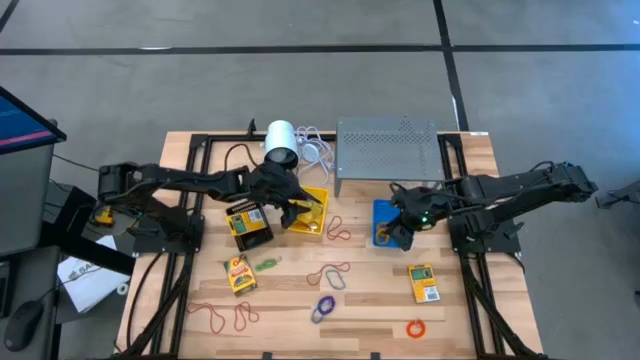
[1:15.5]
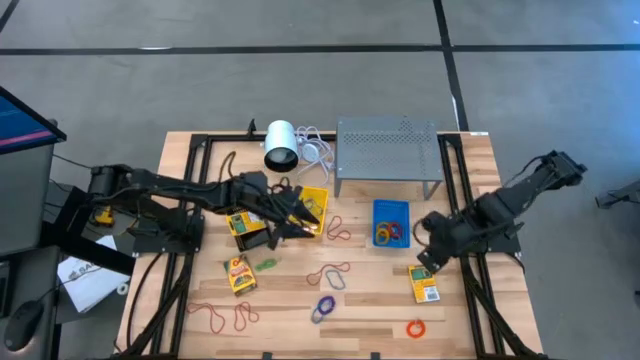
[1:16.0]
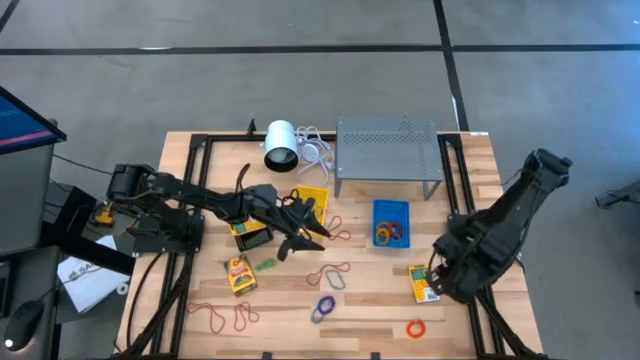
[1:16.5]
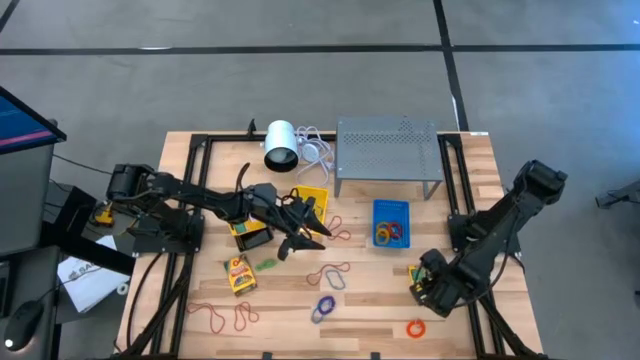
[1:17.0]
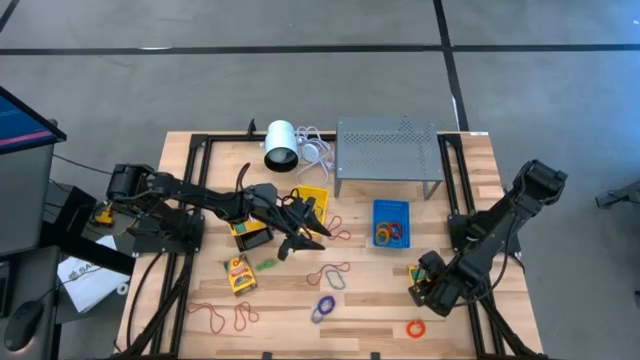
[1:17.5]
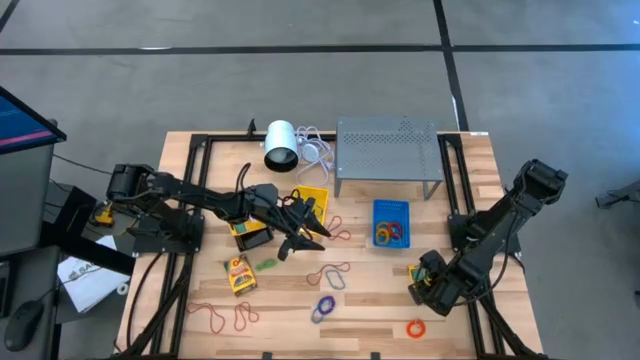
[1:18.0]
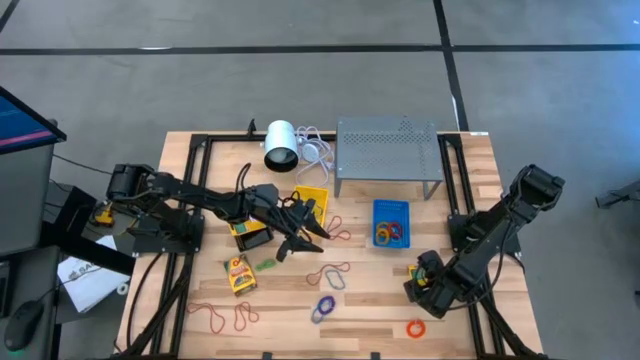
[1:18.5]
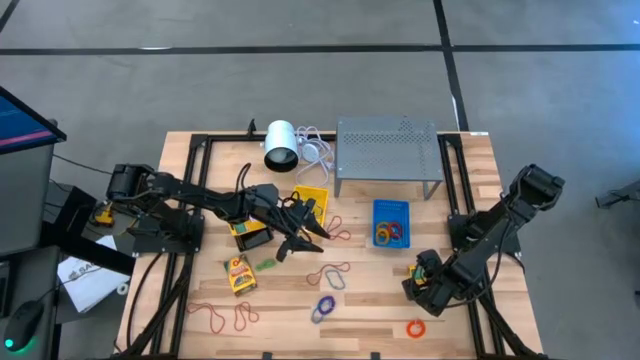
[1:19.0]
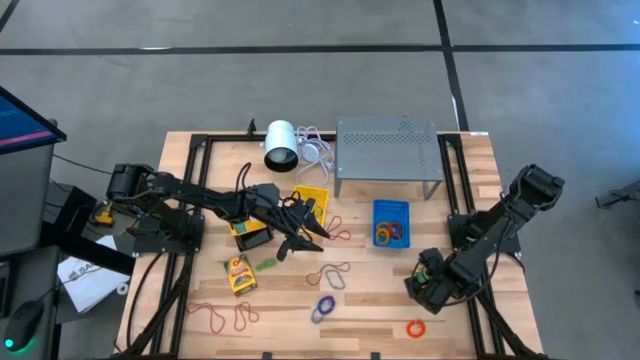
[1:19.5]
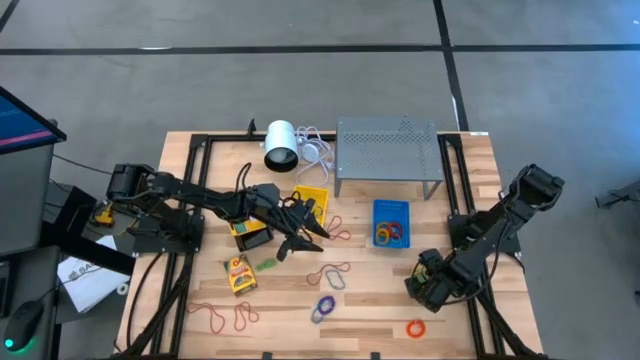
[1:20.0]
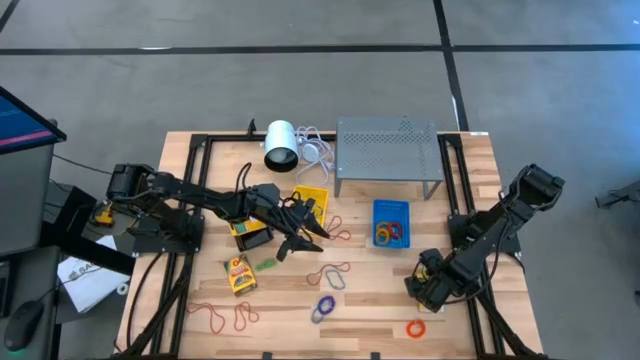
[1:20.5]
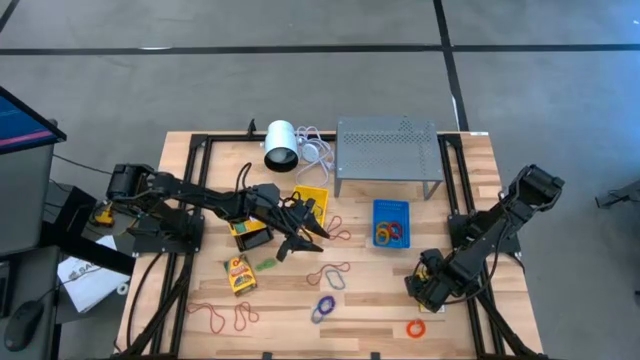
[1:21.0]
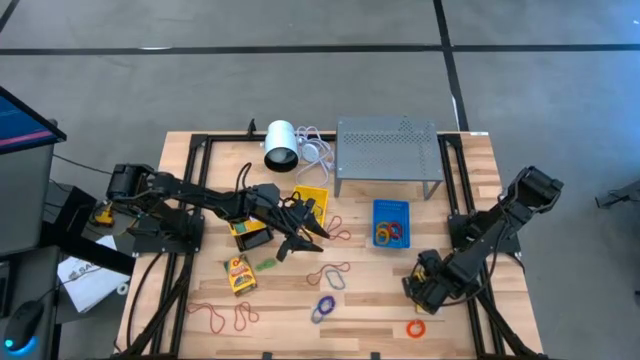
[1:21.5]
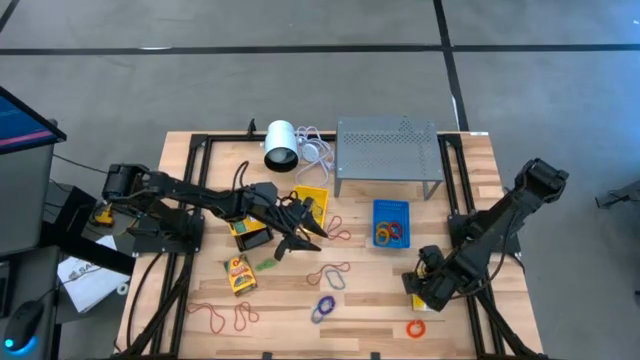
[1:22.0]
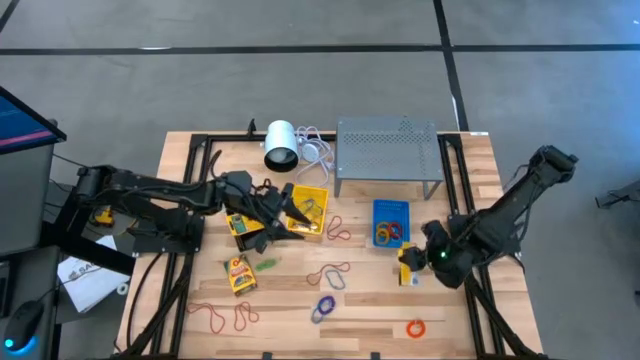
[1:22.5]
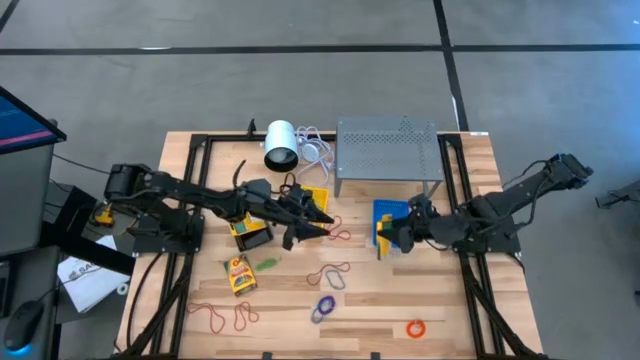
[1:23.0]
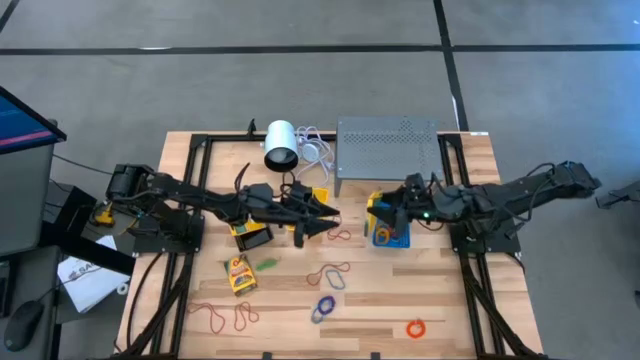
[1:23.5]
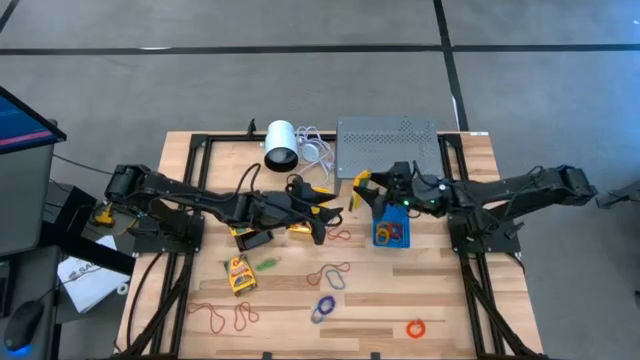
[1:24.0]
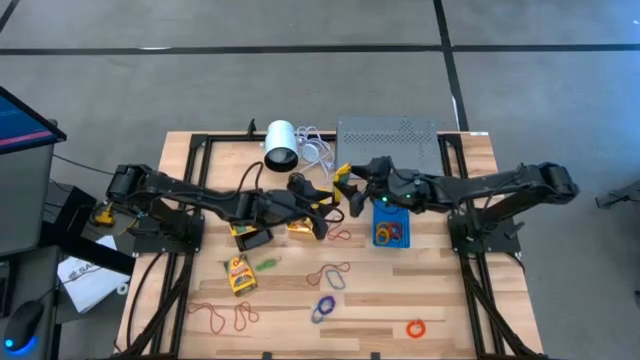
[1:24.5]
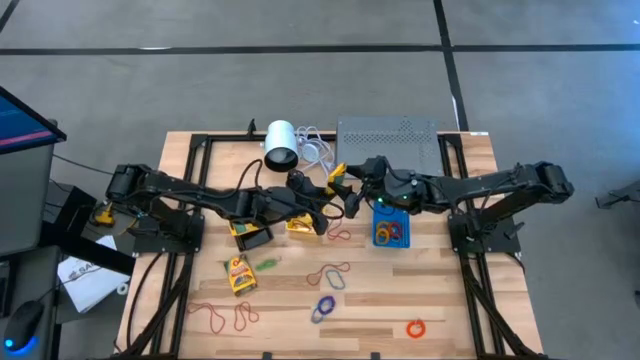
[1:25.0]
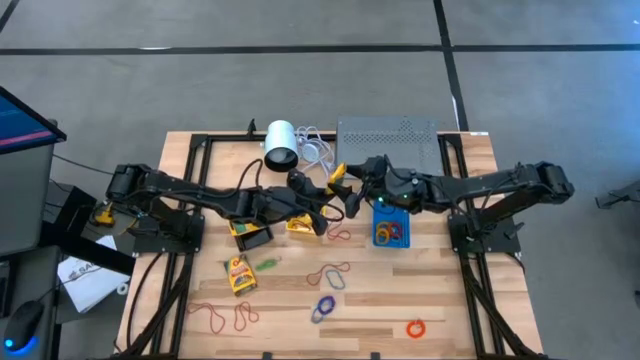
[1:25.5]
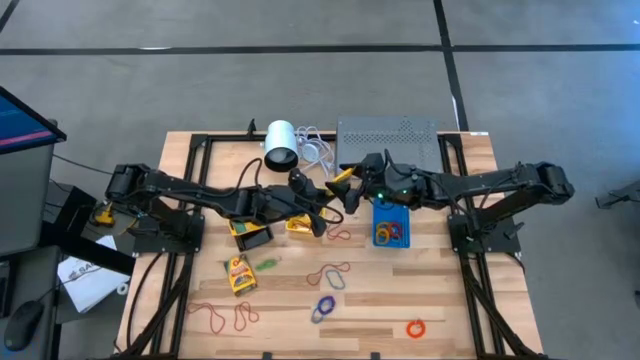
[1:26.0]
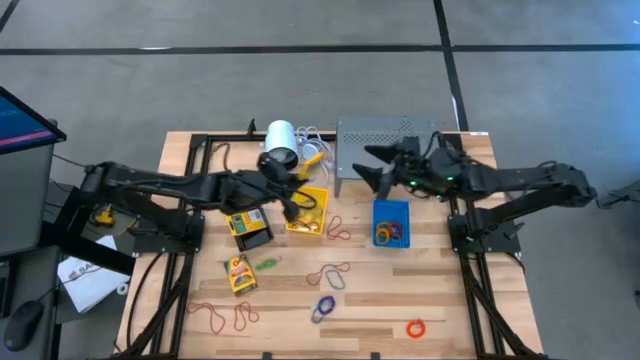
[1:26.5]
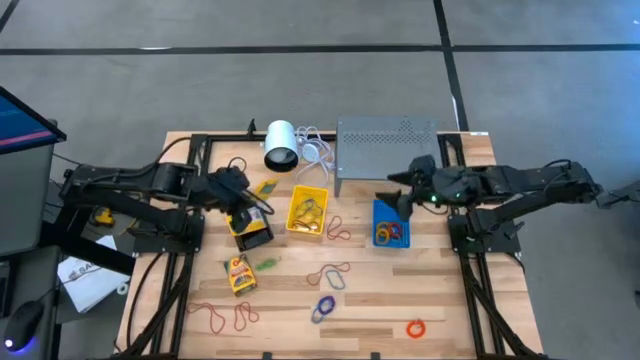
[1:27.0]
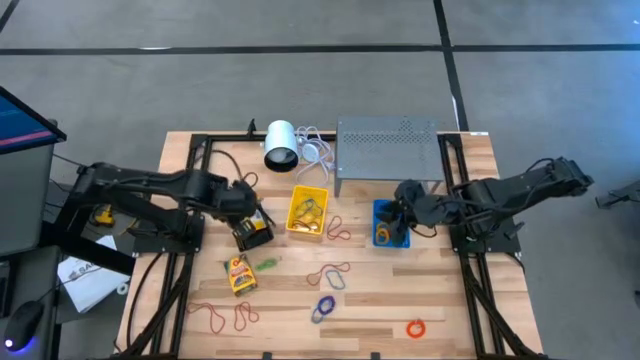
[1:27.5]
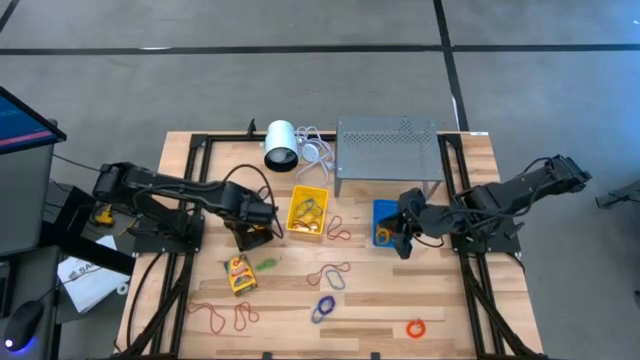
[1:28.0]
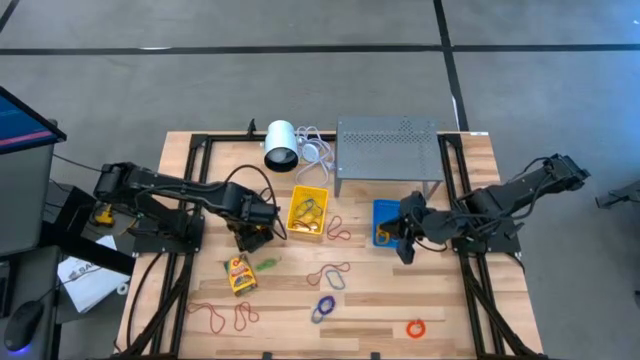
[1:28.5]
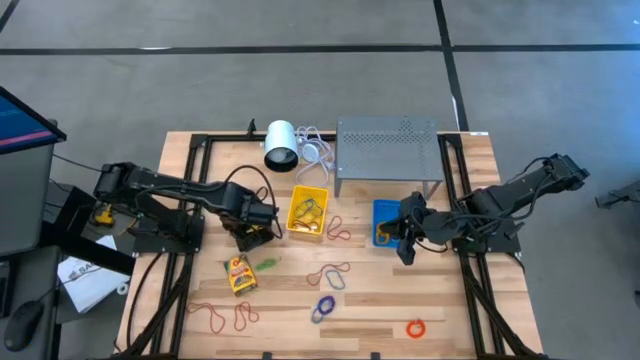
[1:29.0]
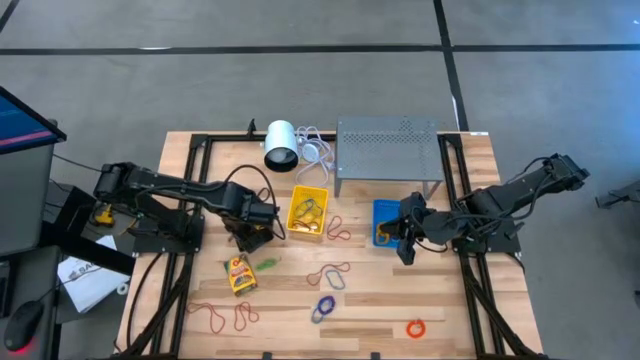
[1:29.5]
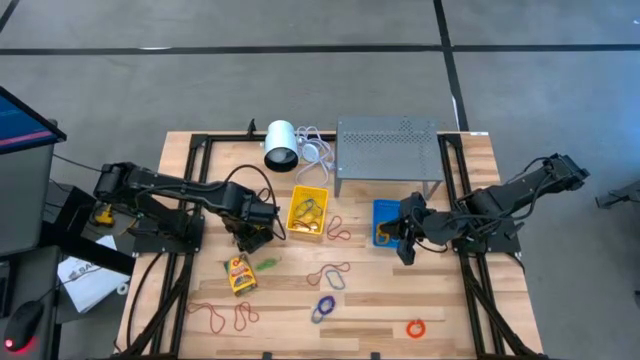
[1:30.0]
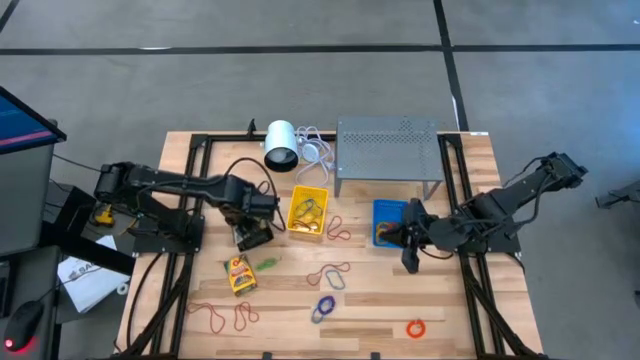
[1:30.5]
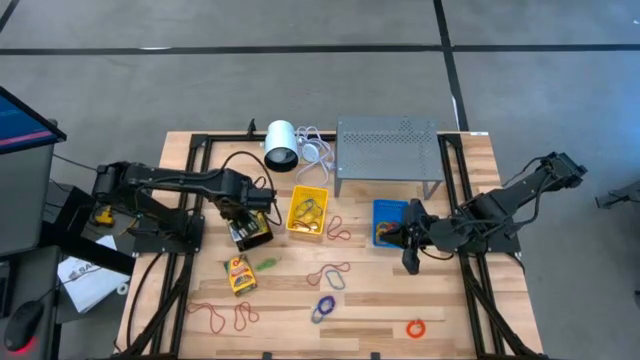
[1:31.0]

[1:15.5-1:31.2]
Task: Pick & Place Office Desk Supplies
Put the right crayon box into the black basket

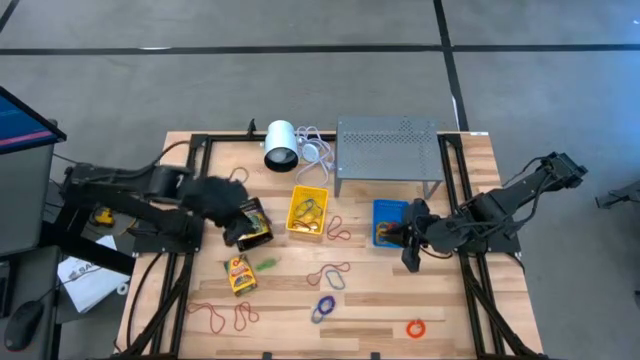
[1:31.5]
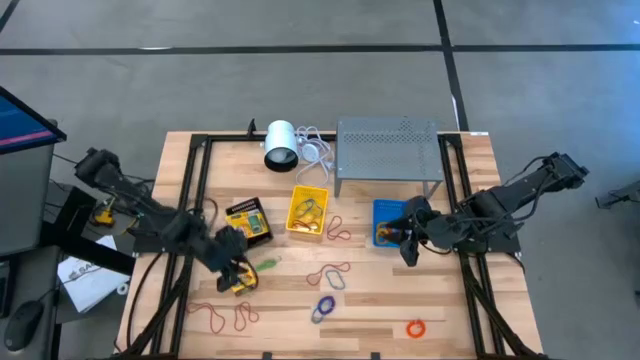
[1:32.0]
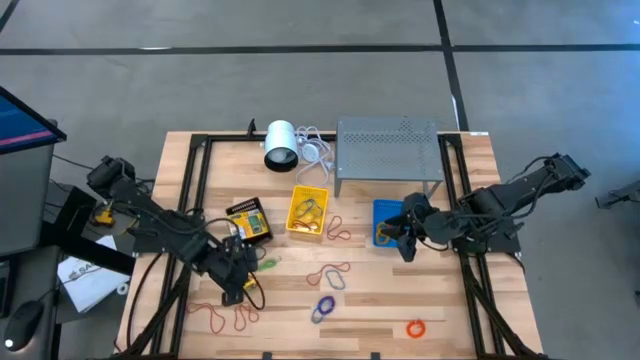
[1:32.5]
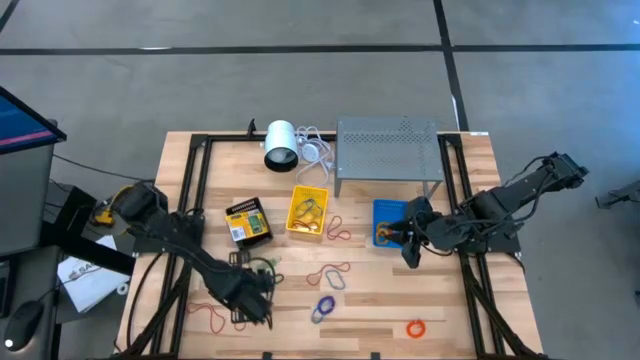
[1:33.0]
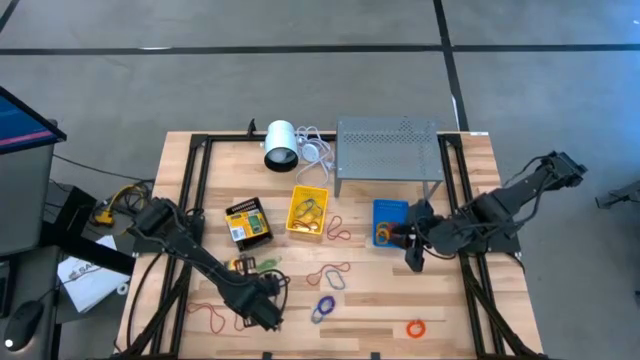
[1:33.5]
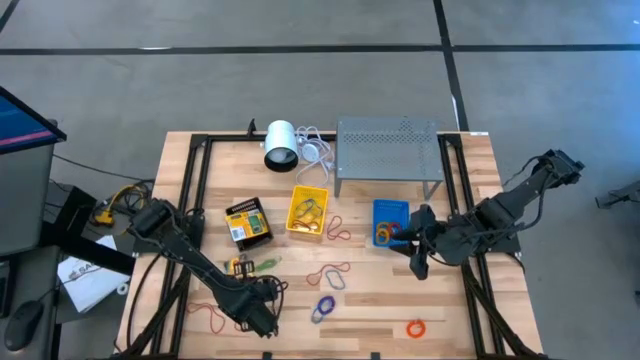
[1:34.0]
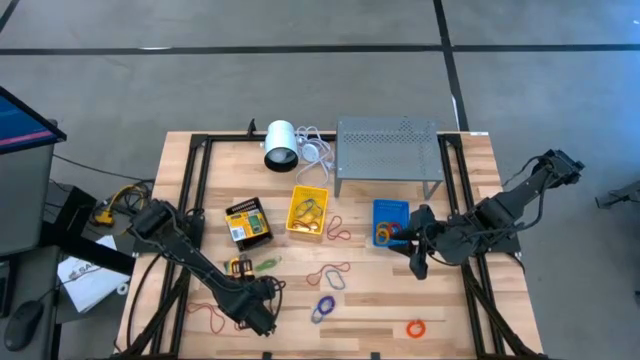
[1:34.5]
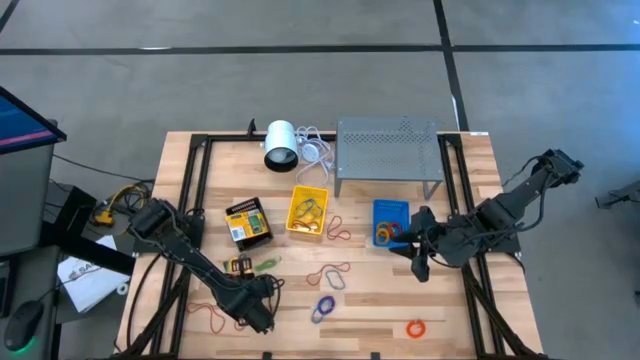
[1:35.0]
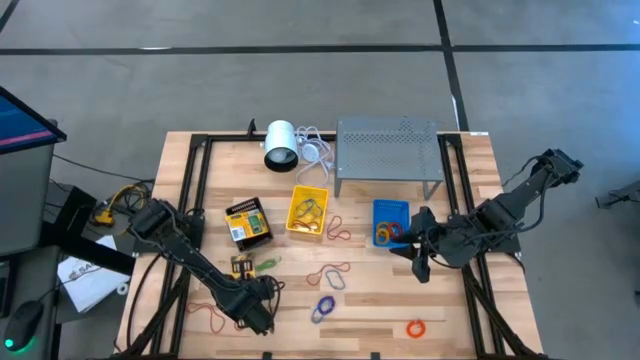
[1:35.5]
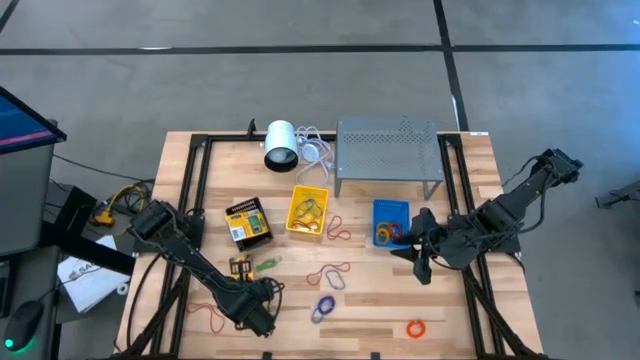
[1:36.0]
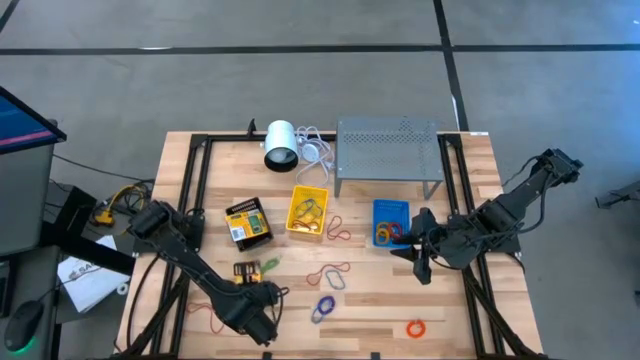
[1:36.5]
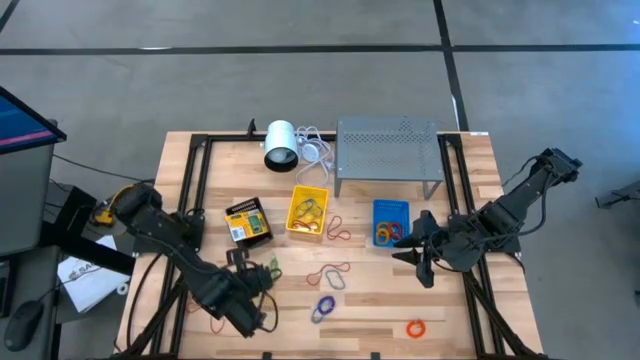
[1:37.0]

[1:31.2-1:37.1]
Put the crayon box into the black basket

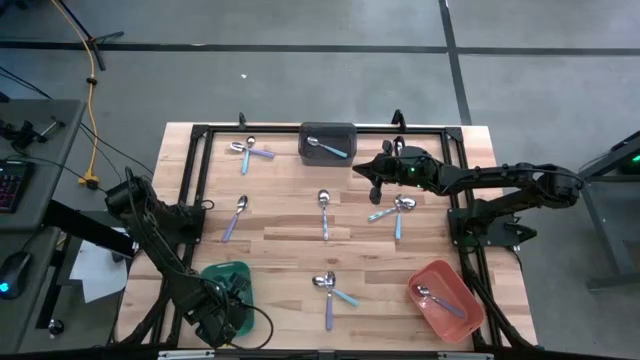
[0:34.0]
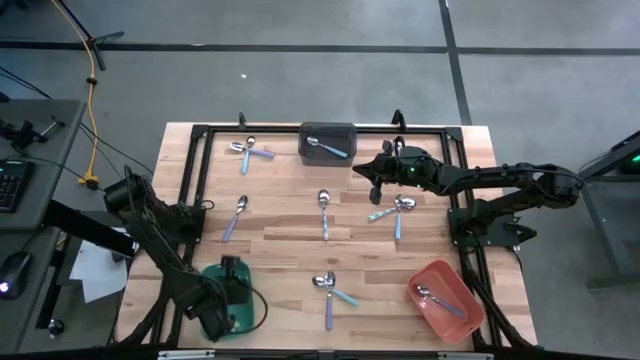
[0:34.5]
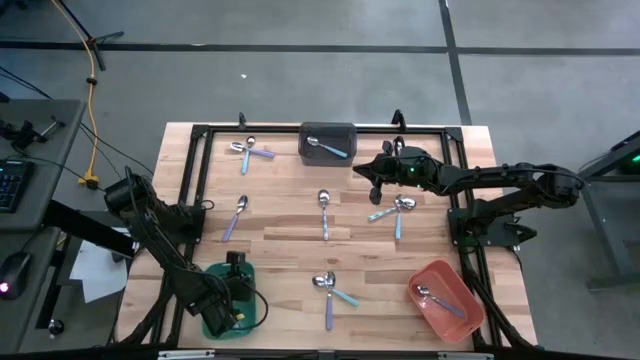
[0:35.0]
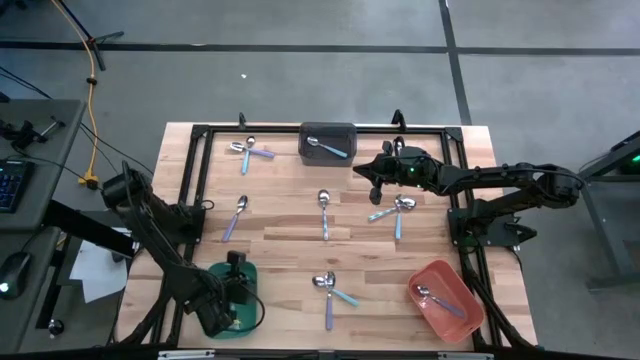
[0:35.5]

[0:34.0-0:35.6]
Task: Sort silverware by color (type)
Adjust the green bin
